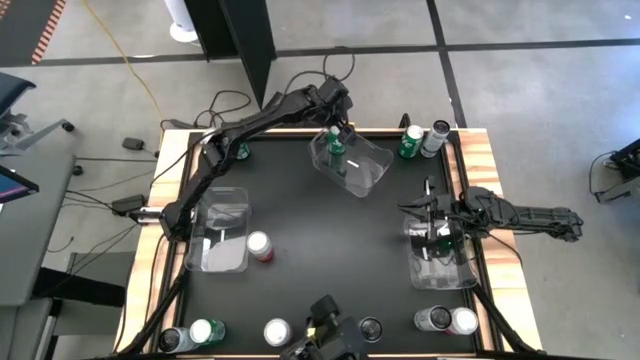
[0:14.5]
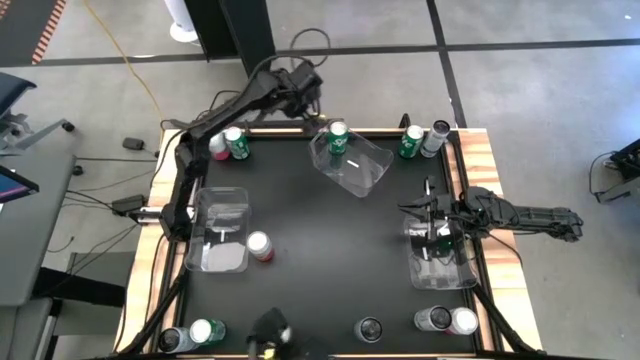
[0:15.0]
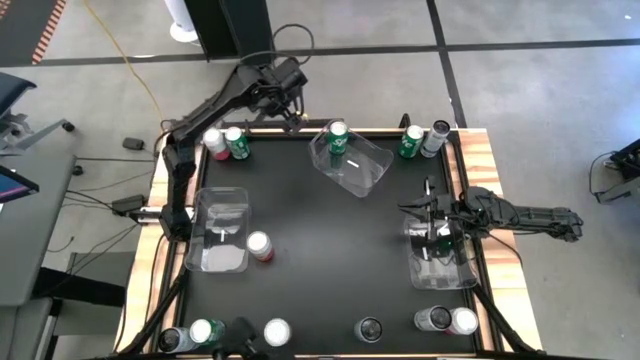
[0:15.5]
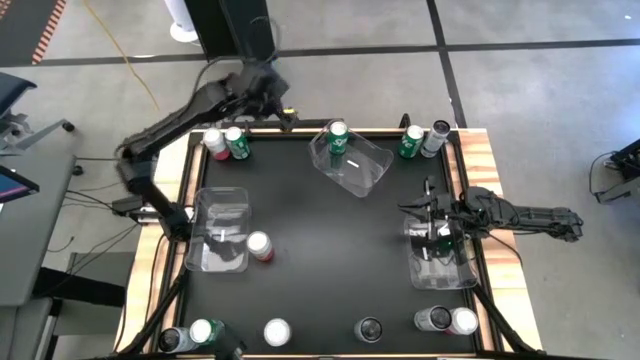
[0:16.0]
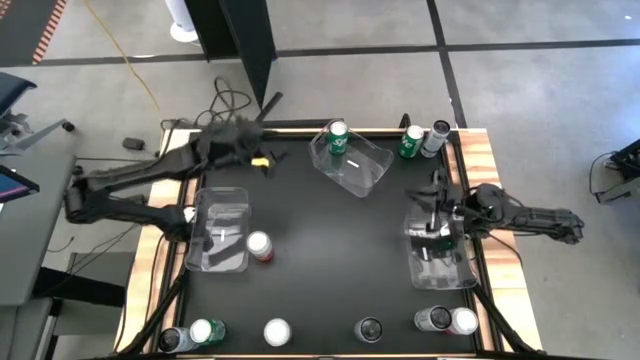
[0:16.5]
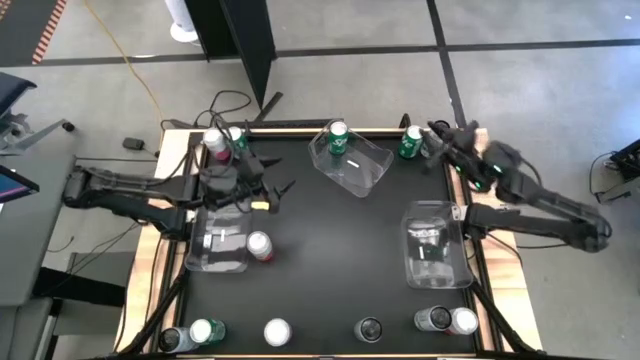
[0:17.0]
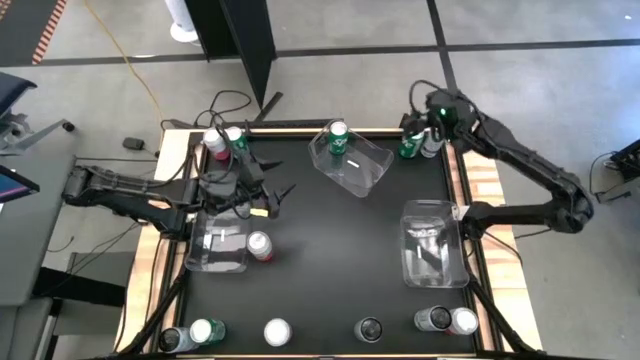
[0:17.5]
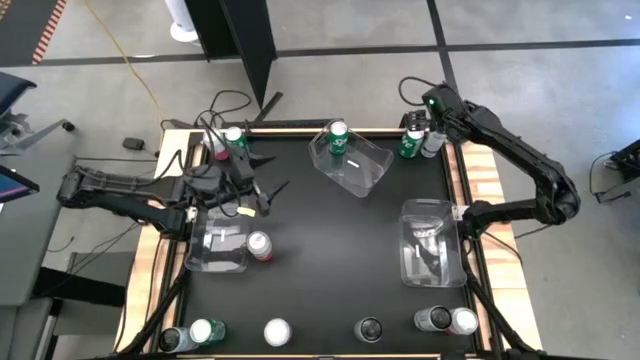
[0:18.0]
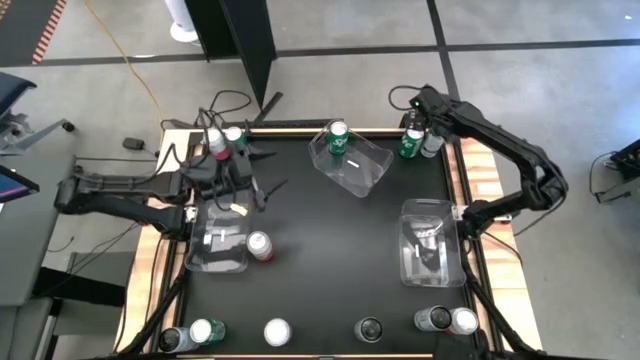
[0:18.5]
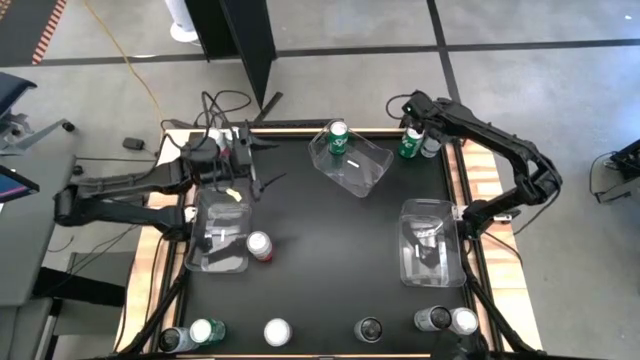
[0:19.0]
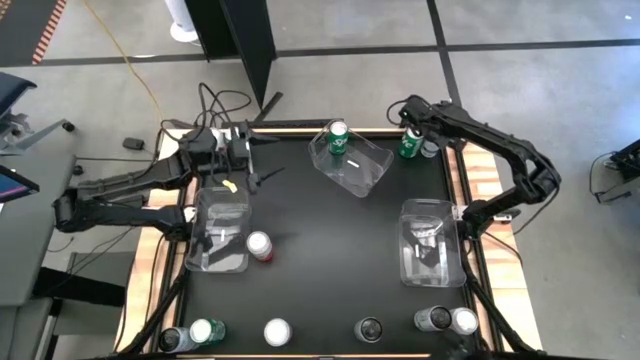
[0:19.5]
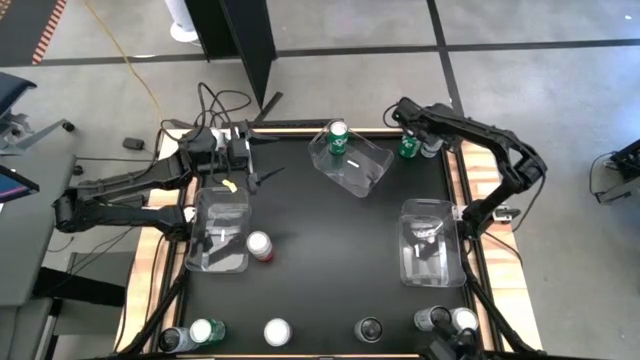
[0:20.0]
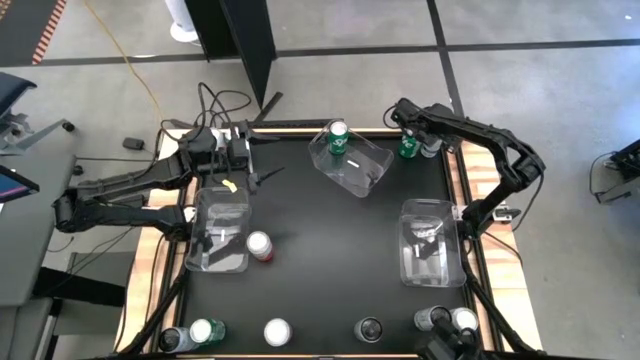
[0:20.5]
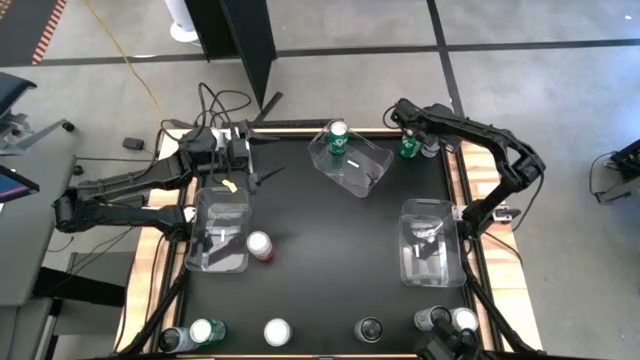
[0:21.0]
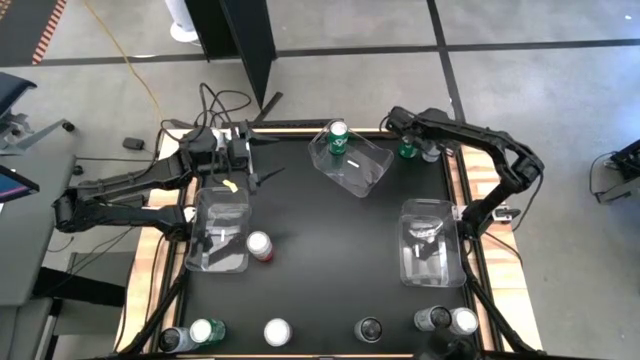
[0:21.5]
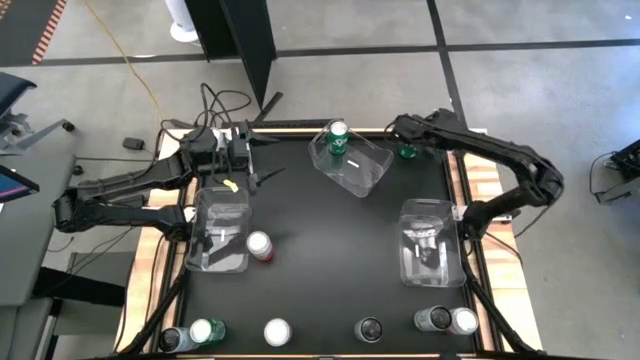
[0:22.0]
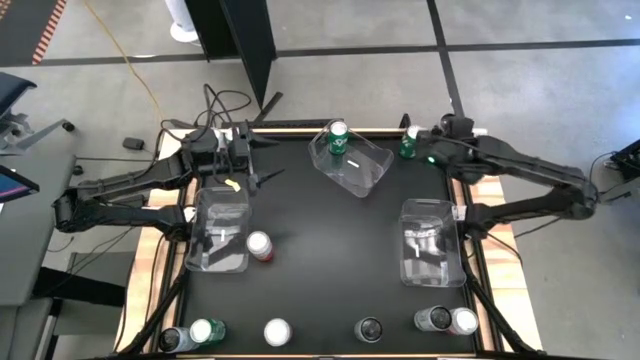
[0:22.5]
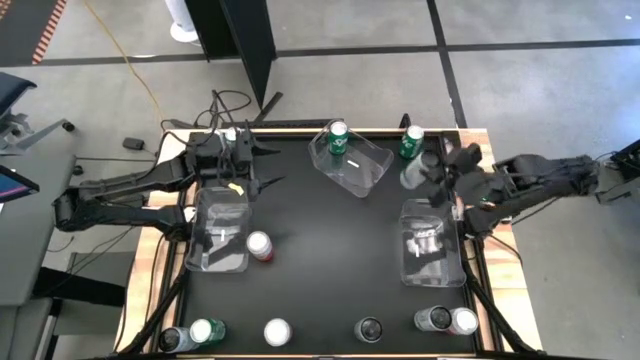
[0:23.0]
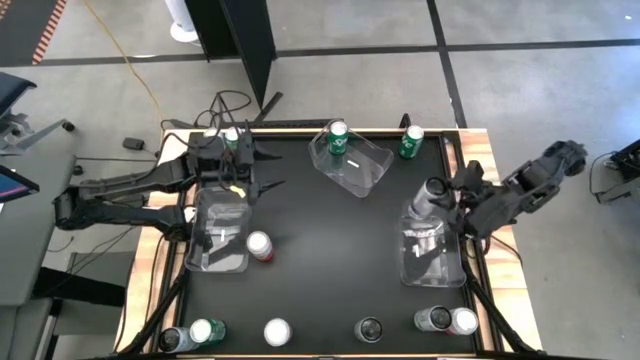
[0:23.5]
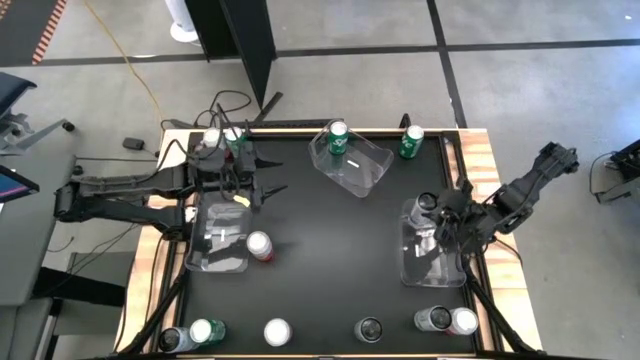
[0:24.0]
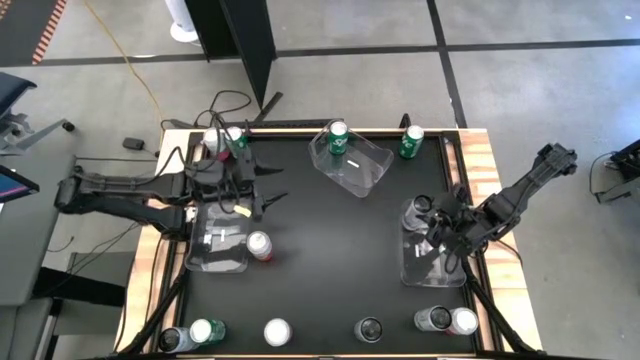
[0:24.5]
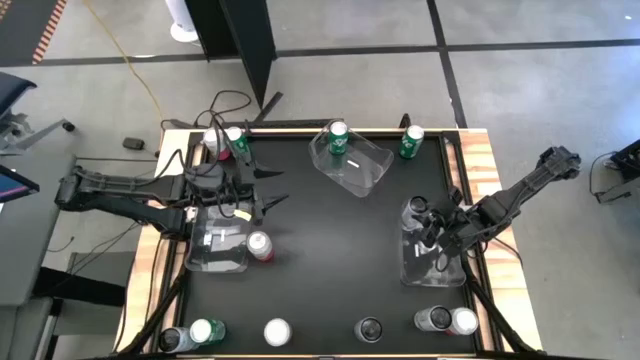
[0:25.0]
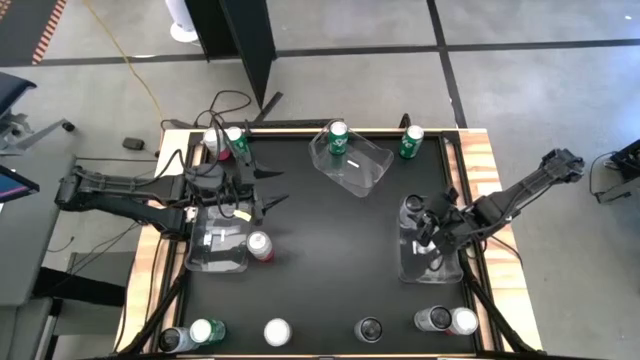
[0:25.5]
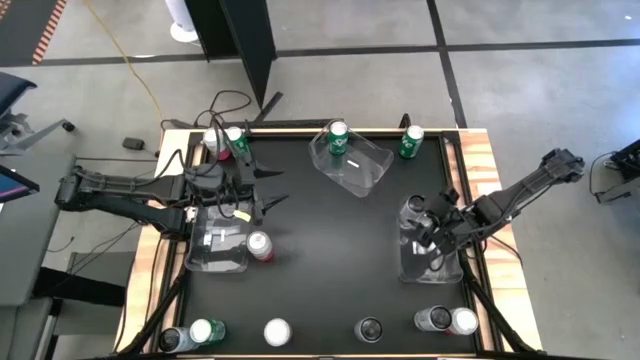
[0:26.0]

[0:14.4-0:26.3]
Task: Sort soda cans
Put the top right white blue soda can into the right transparent bin

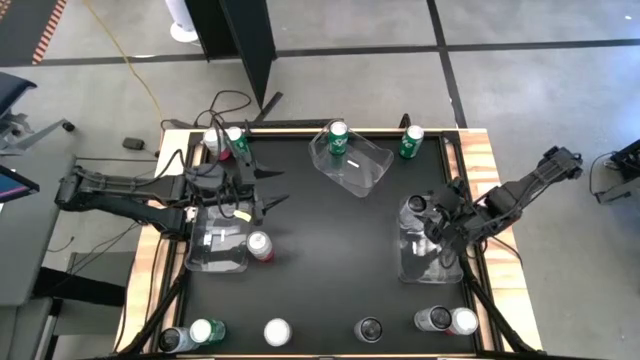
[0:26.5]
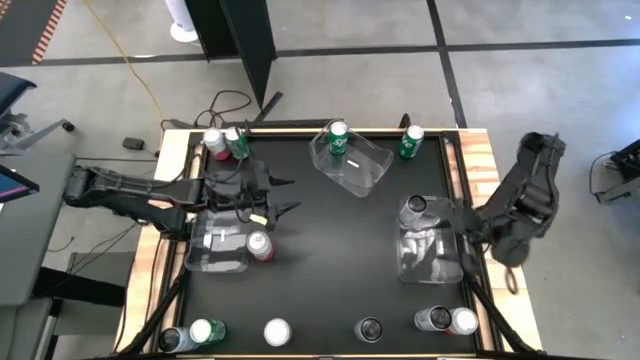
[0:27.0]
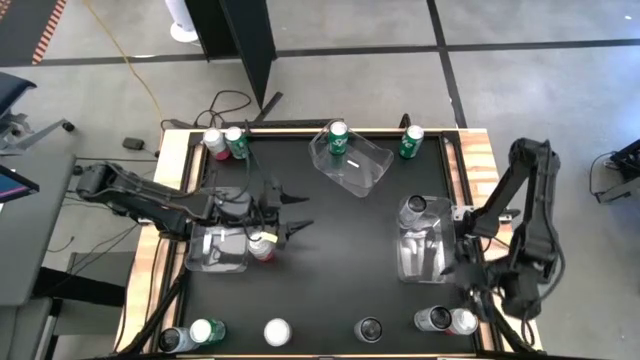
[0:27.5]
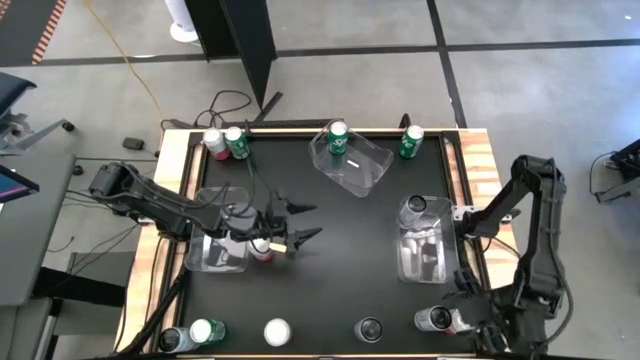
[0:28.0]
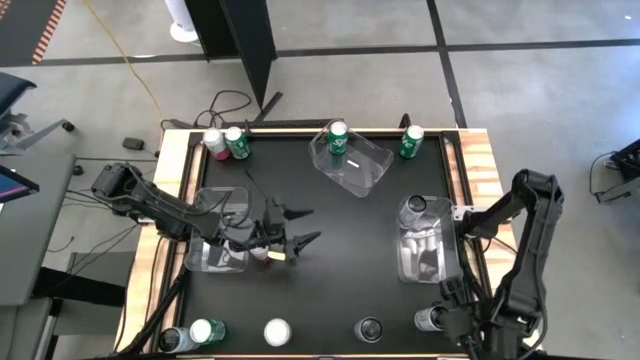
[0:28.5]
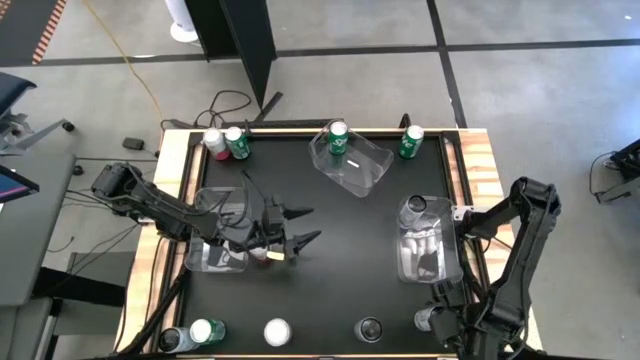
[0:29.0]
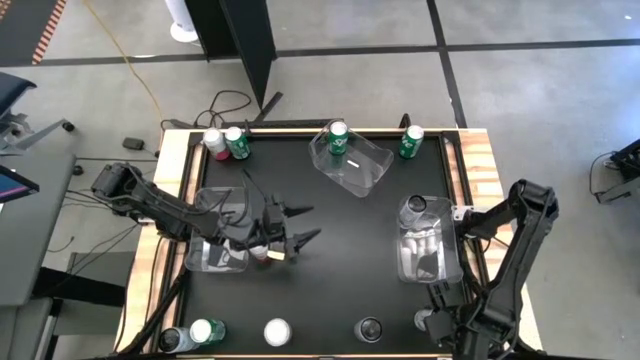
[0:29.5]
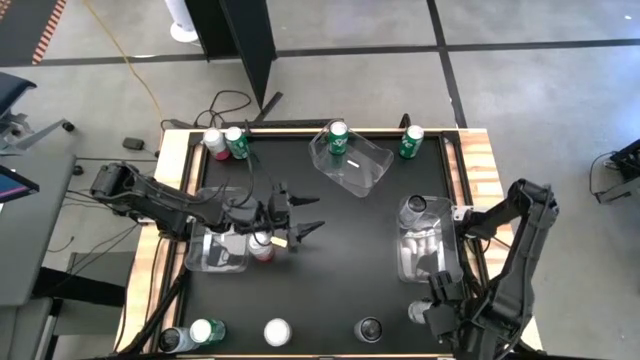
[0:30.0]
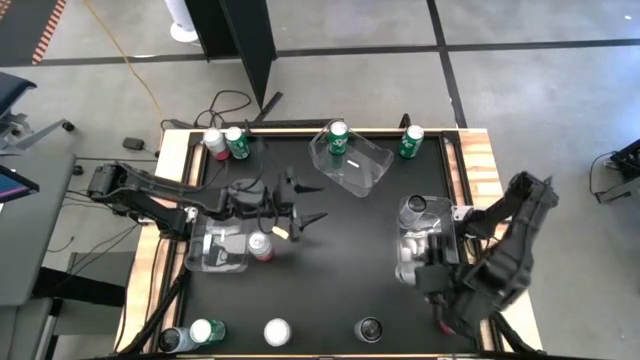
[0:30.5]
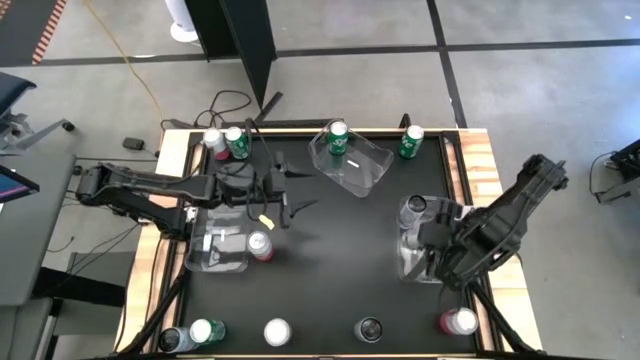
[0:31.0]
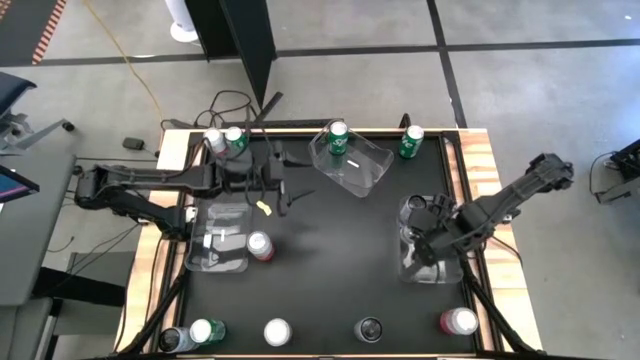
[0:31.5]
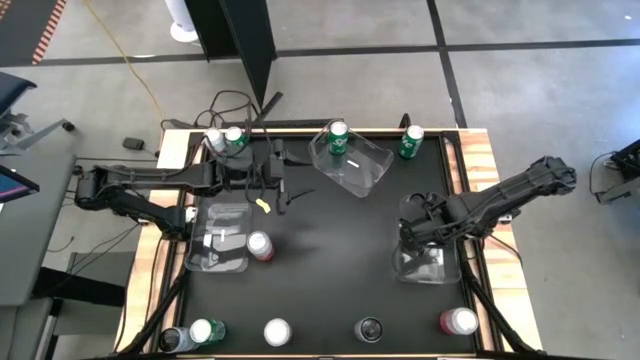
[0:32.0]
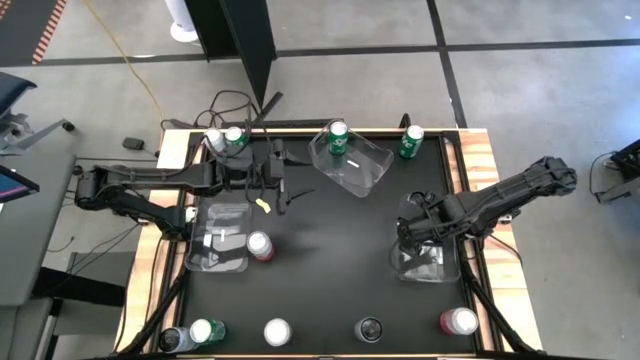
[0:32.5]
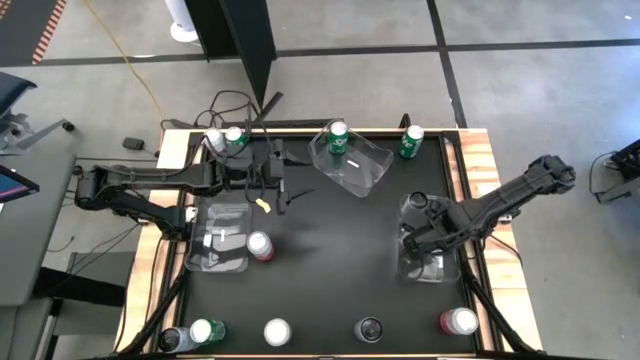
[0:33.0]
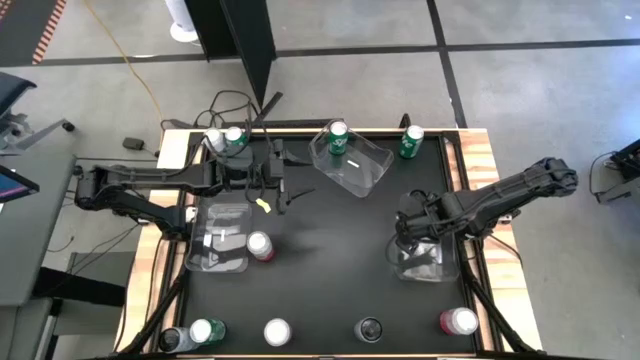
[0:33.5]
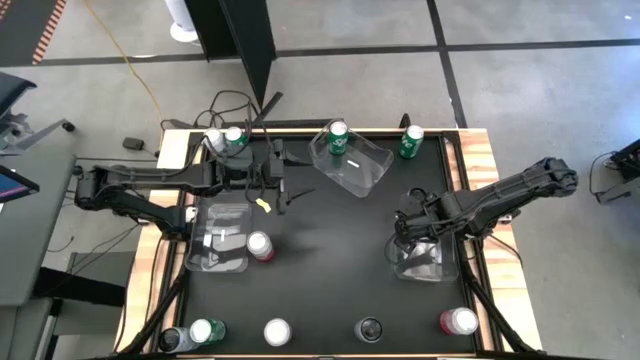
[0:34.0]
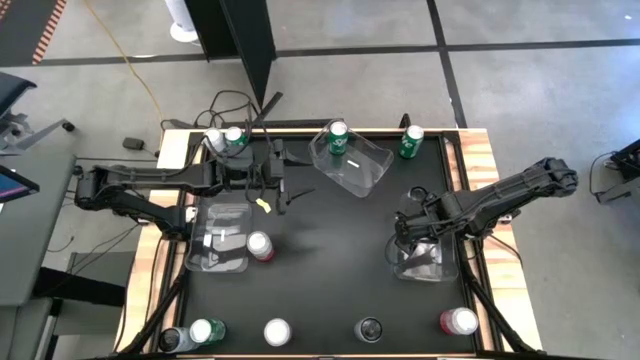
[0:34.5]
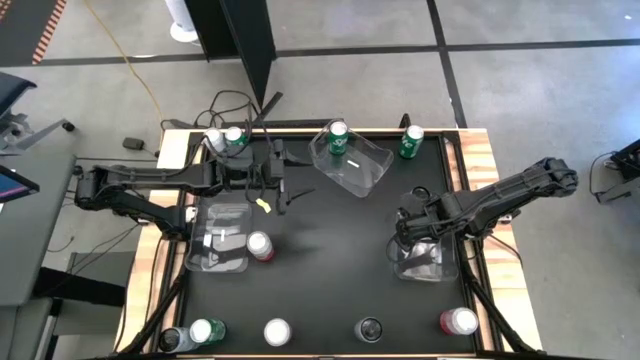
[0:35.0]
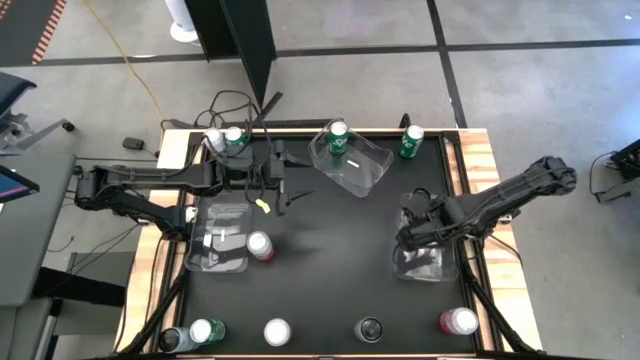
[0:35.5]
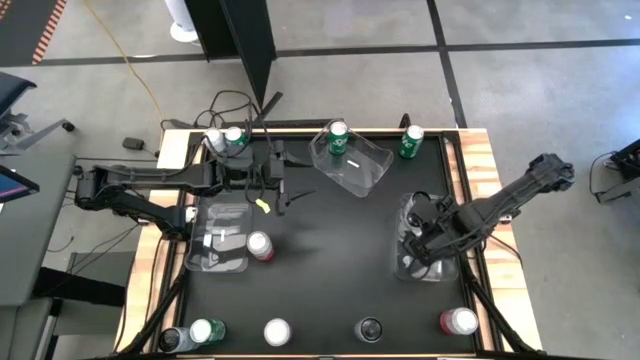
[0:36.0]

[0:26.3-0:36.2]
Put the right white blue soda can into the right transparent bin
